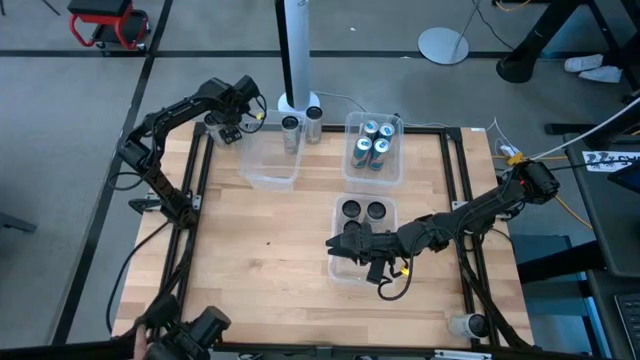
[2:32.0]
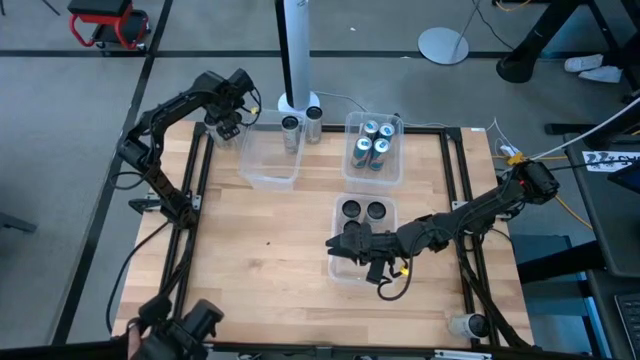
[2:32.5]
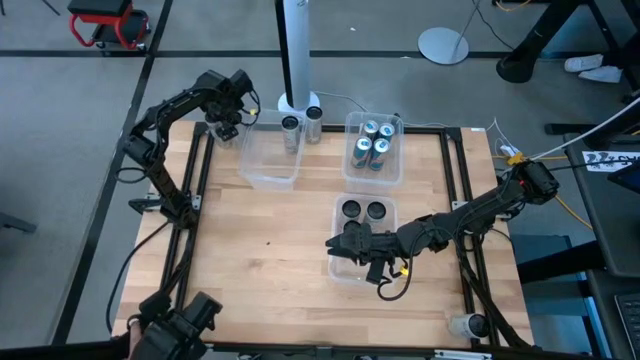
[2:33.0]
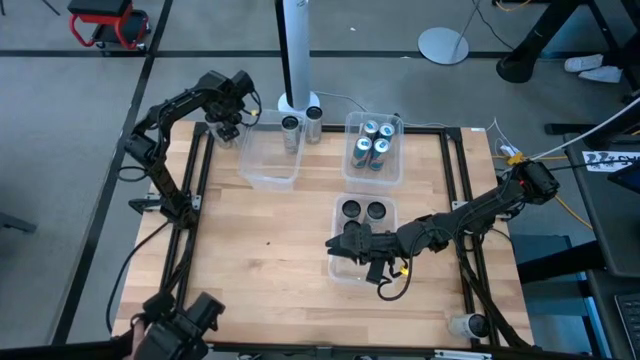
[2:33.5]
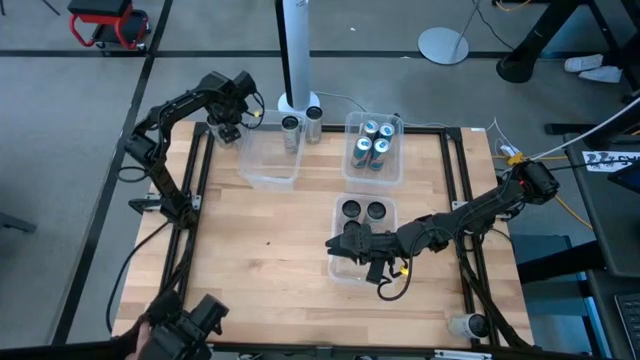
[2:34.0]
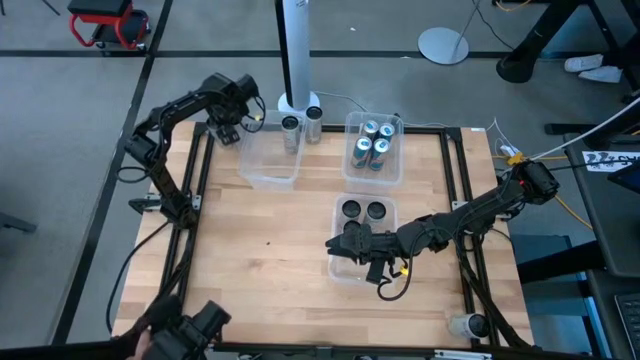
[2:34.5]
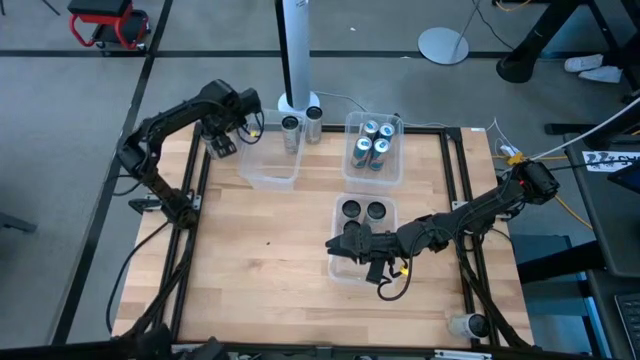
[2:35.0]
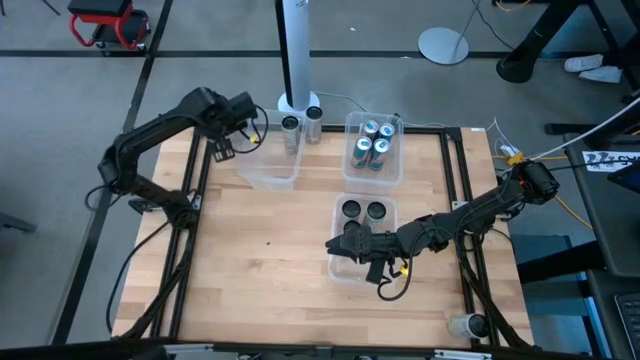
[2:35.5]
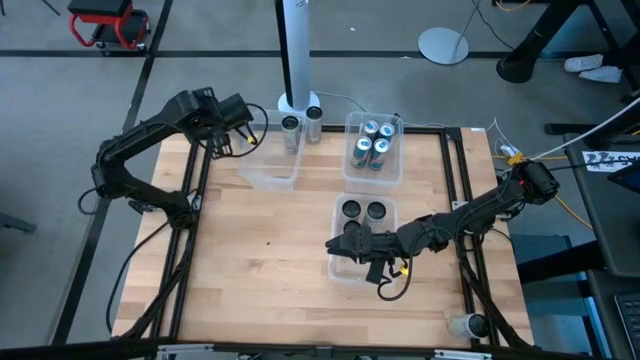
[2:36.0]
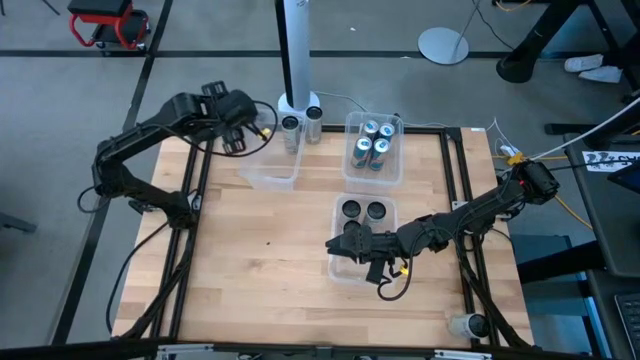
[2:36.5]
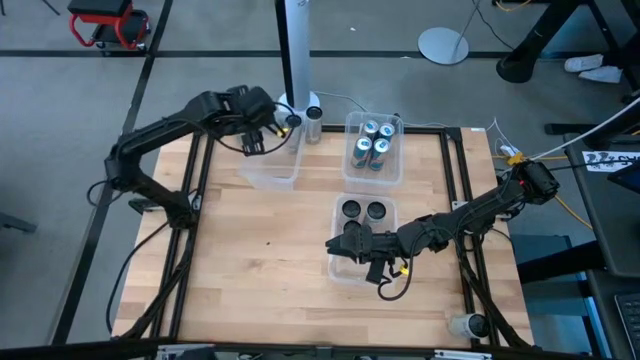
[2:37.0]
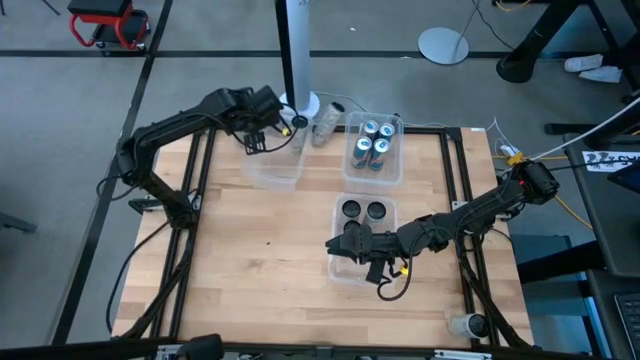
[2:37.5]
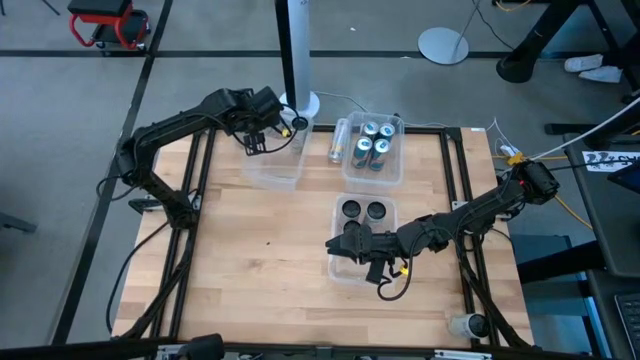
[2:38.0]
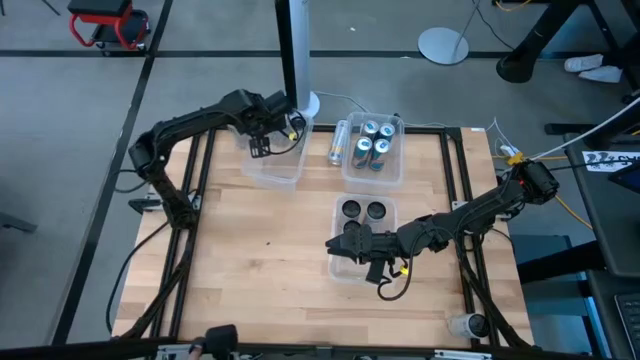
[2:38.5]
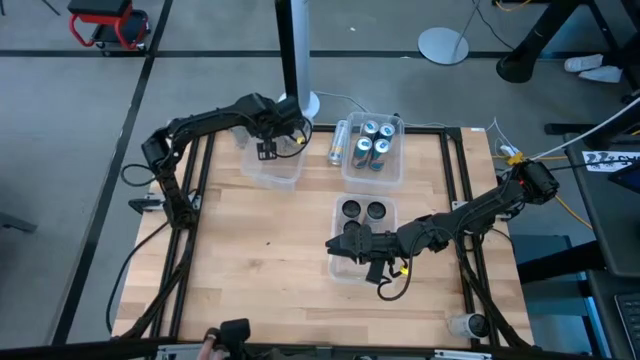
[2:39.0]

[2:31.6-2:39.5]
Task: Sort soda cans
Put the white yellow soda can into the top left transparent bin

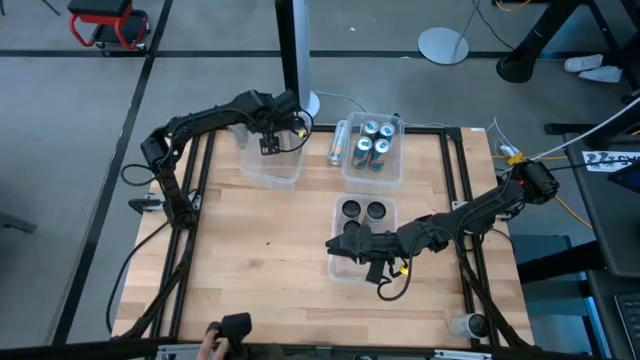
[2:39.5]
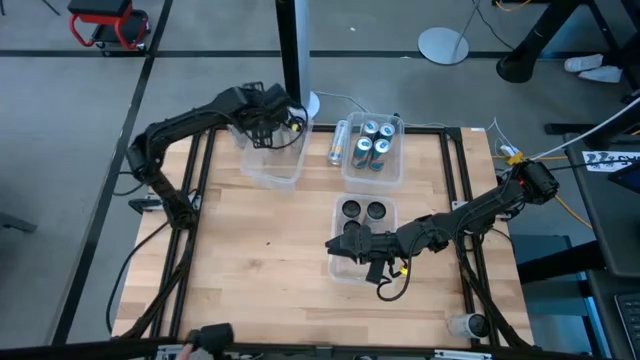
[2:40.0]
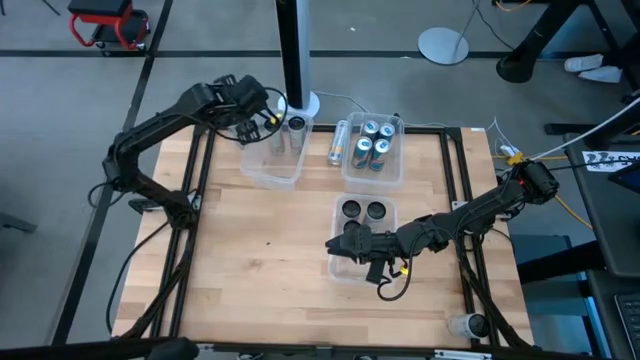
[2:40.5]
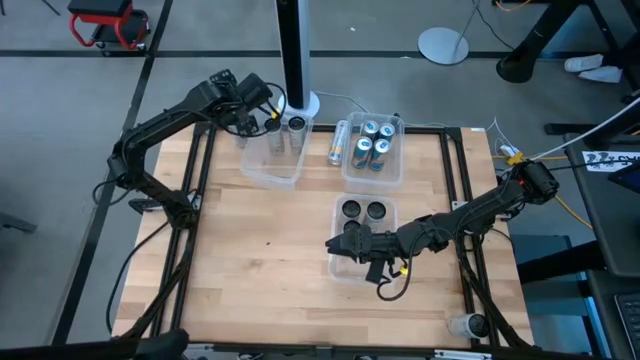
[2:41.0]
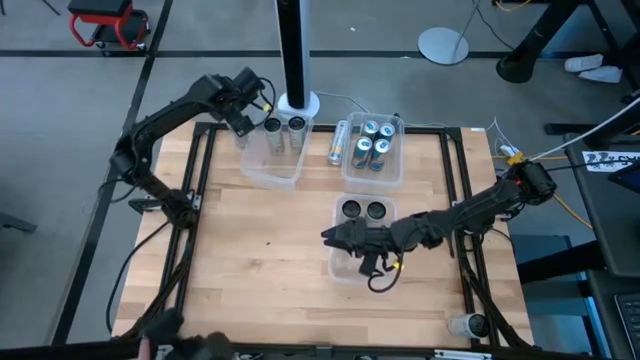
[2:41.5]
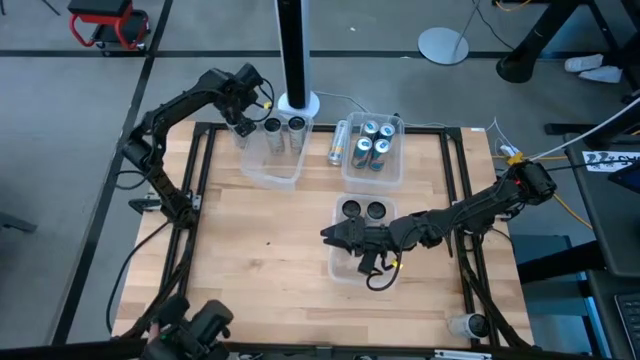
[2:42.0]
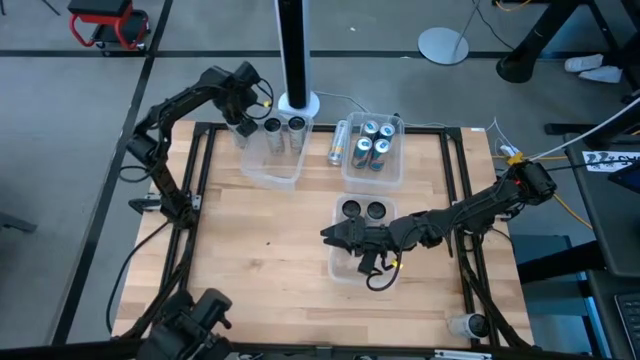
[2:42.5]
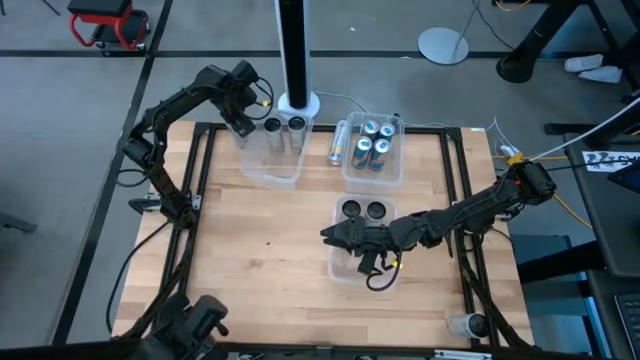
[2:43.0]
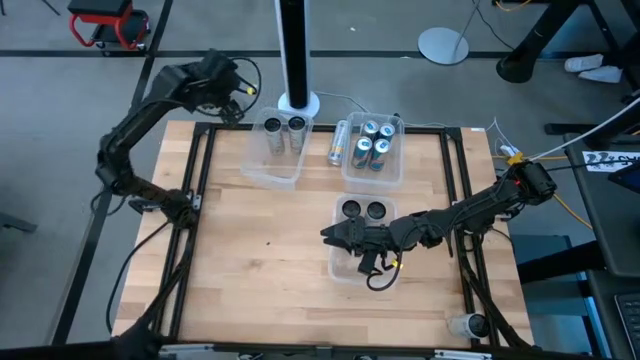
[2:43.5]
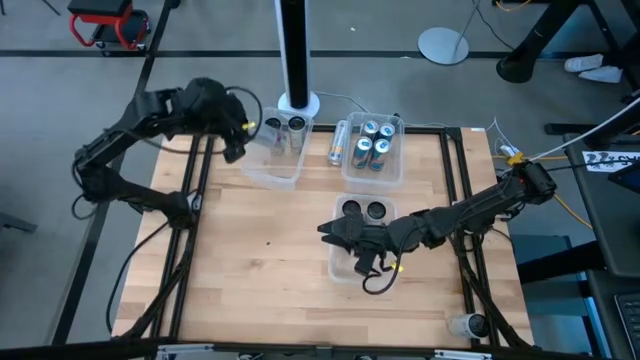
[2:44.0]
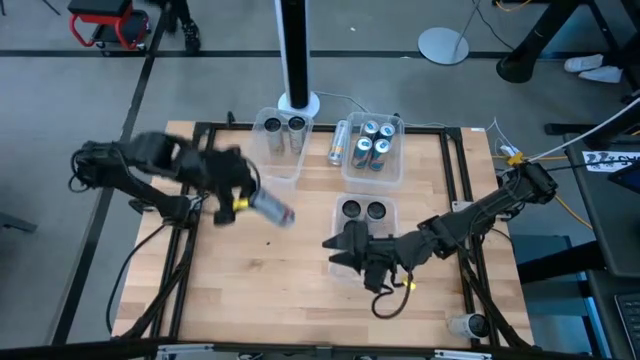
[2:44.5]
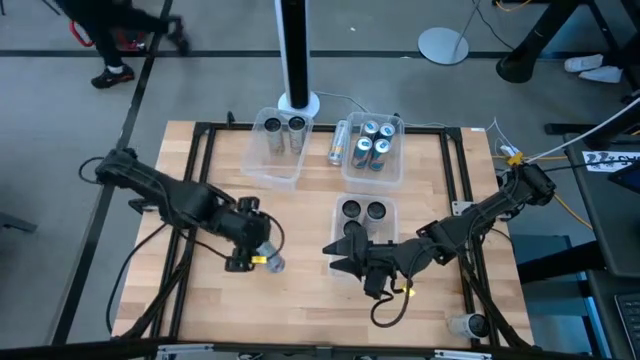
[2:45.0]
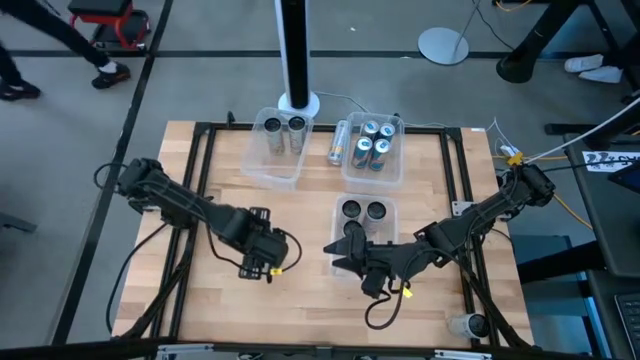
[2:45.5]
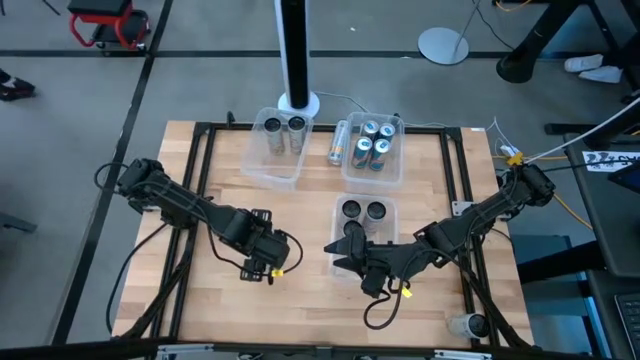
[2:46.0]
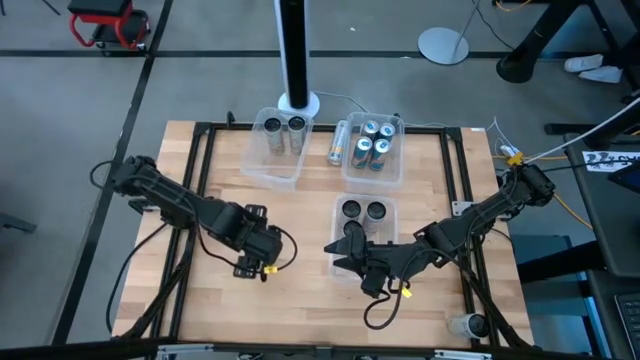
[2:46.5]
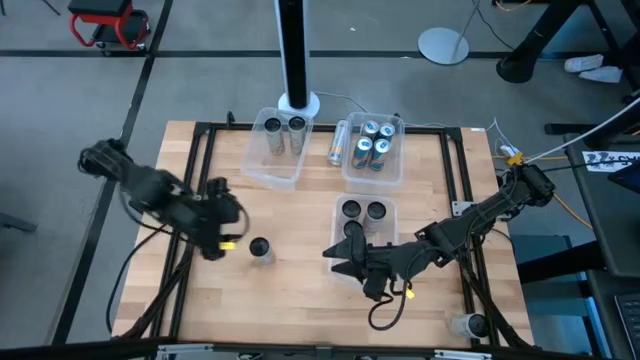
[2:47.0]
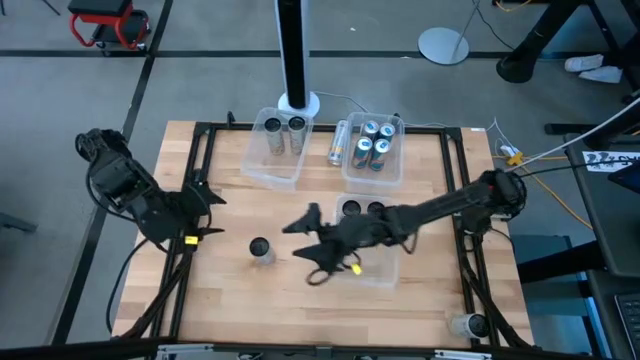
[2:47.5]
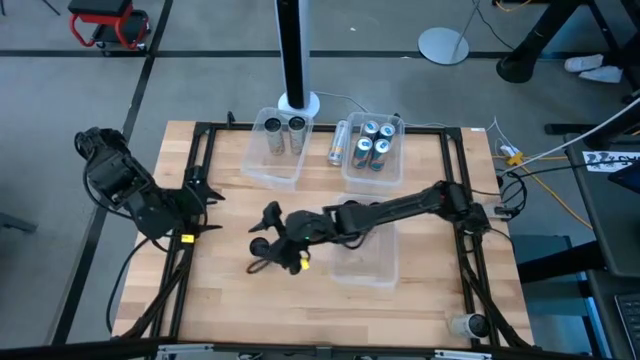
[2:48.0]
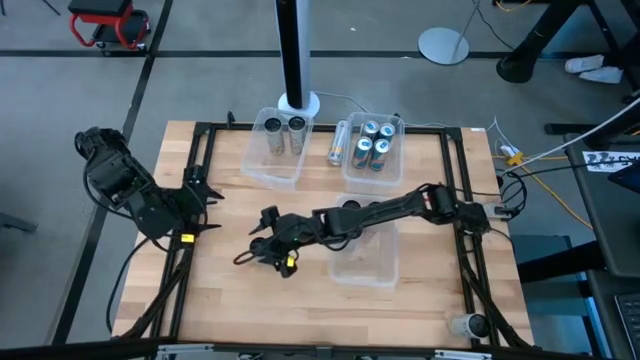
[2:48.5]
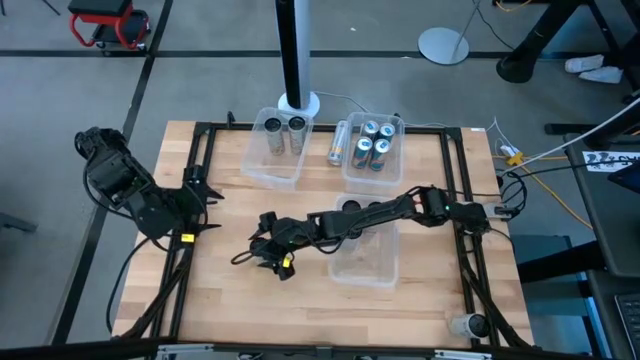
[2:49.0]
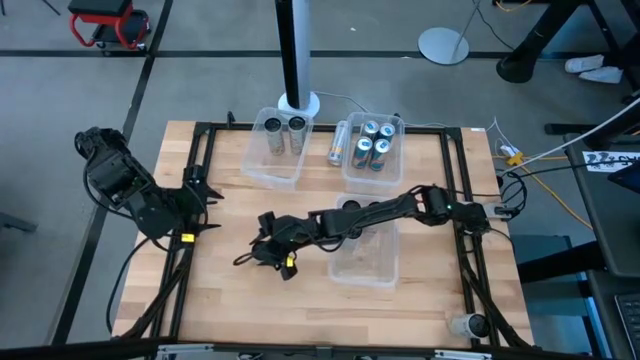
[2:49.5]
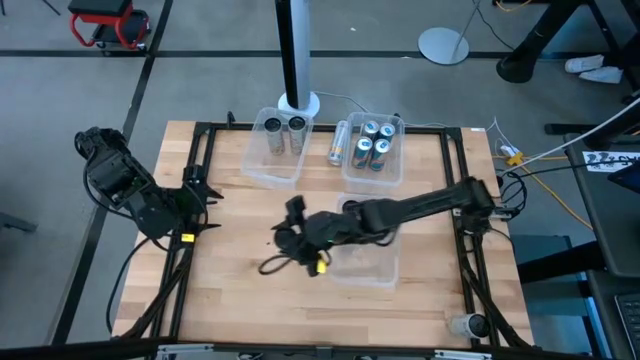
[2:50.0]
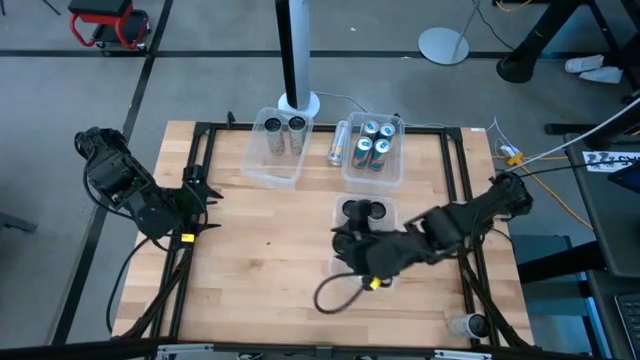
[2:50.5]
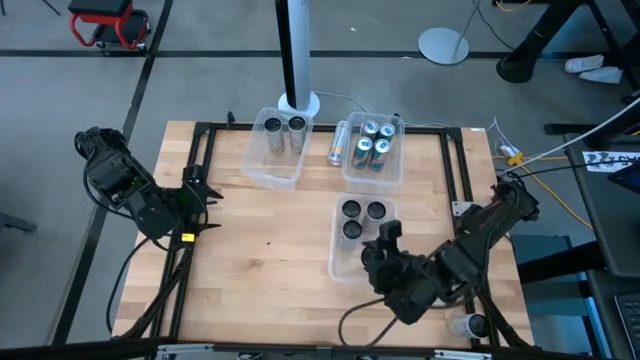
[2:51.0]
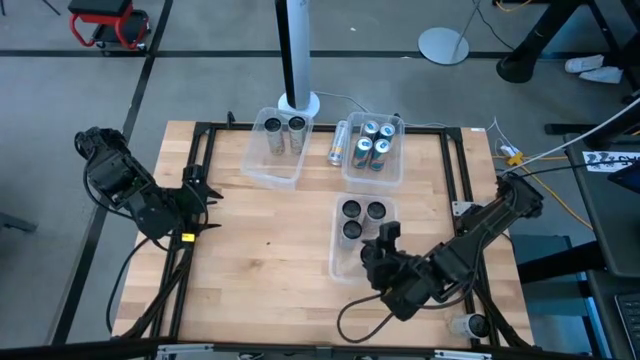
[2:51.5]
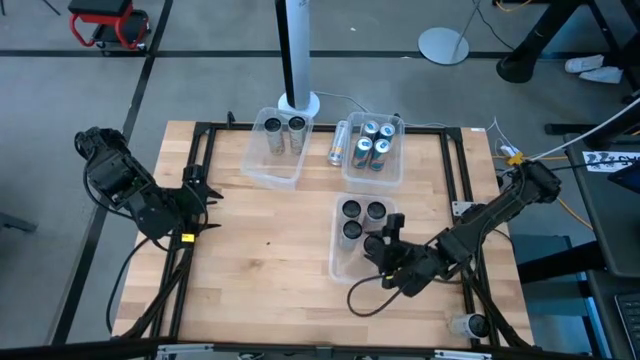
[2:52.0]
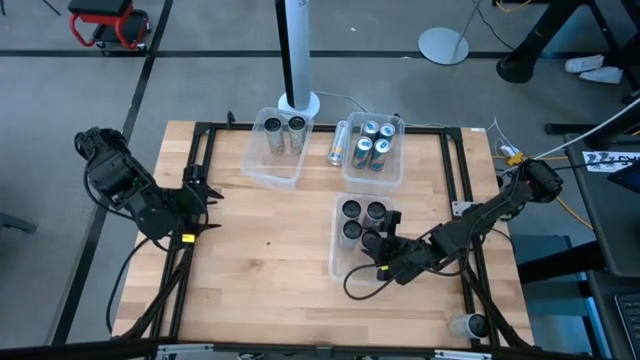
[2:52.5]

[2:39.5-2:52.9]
Put the white pink soda can into the bottom right transparent bin

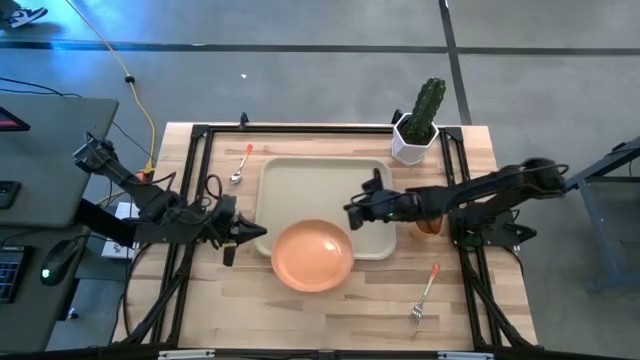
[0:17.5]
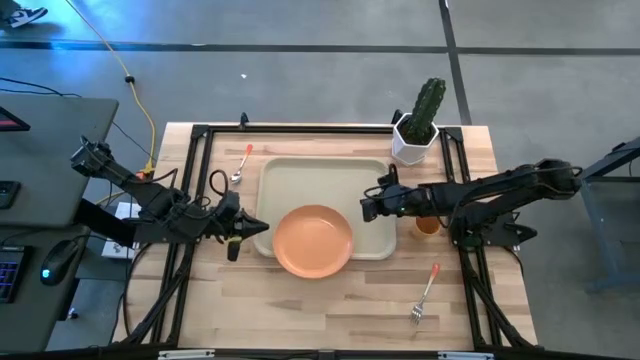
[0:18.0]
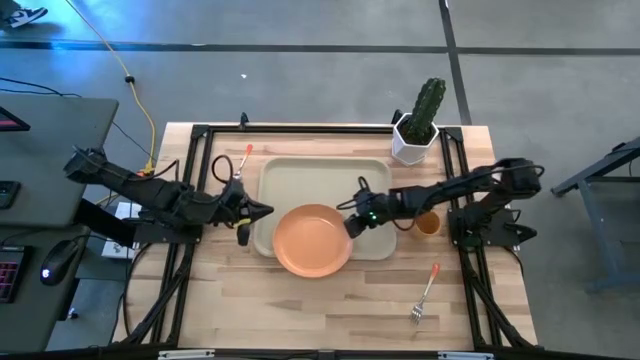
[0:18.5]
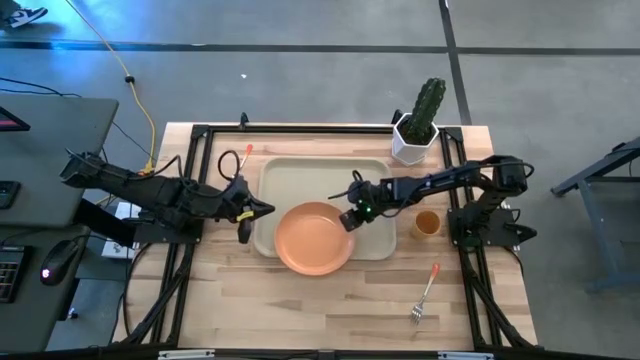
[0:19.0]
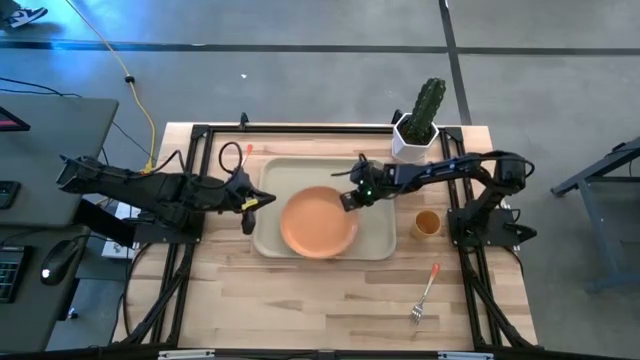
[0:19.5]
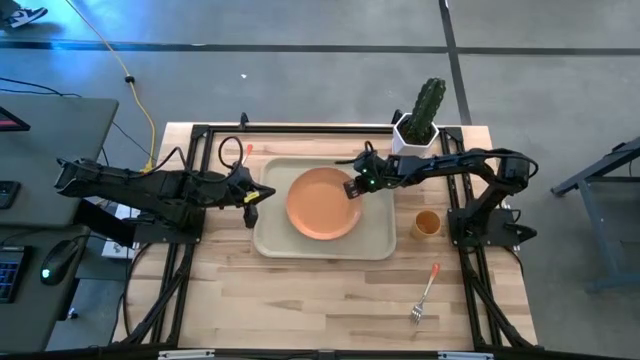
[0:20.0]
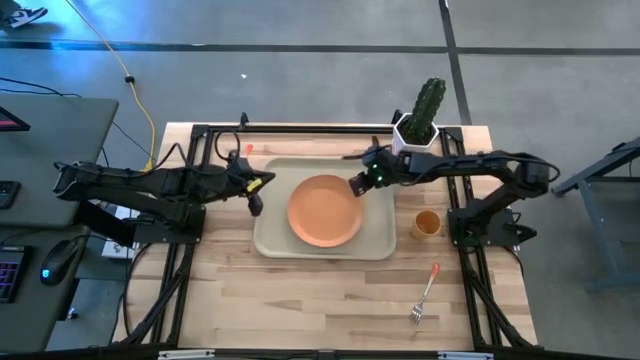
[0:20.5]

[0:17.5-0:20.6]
Task: Pick and place plate/cup/fork/spoon on tray
Put the orange plate on the center of the brown tray
